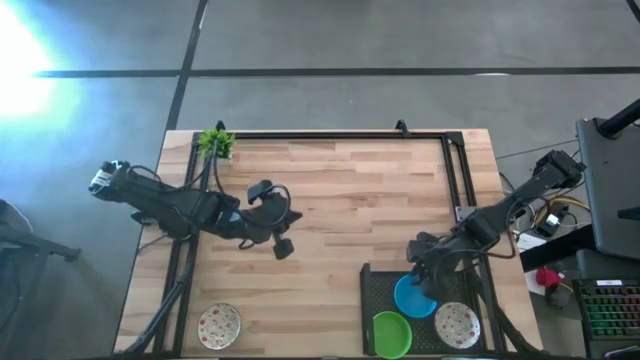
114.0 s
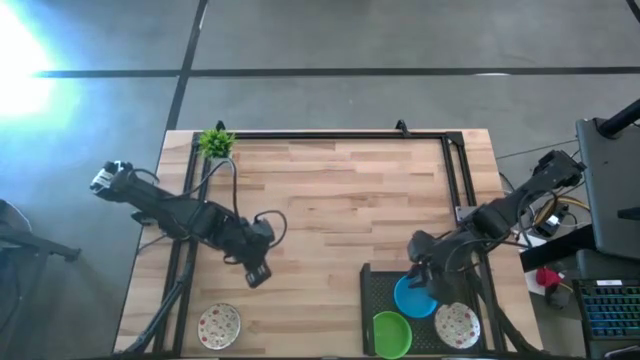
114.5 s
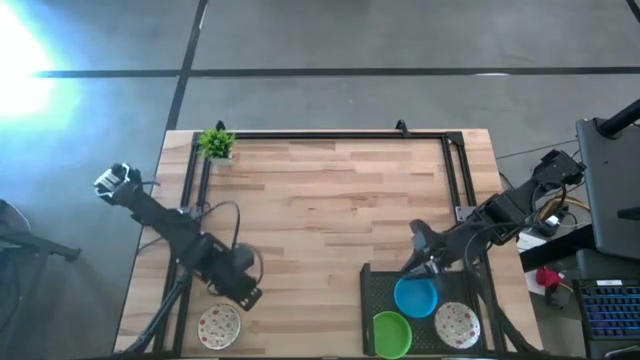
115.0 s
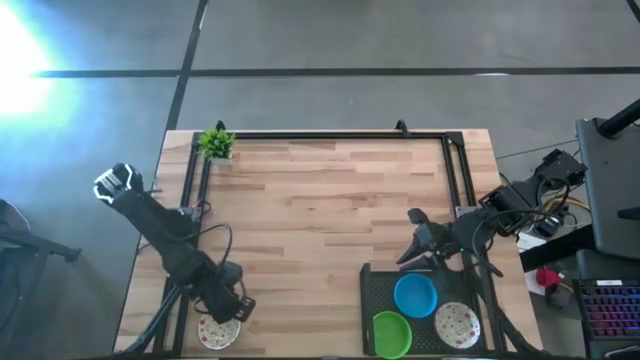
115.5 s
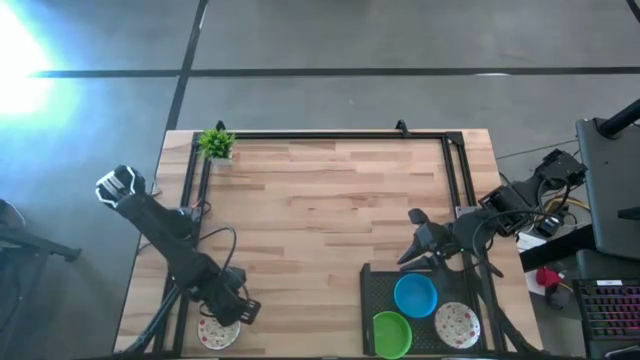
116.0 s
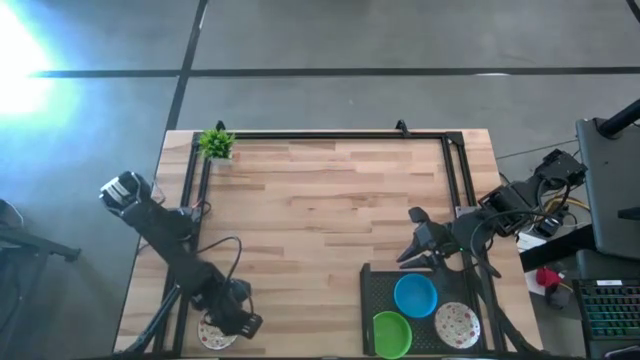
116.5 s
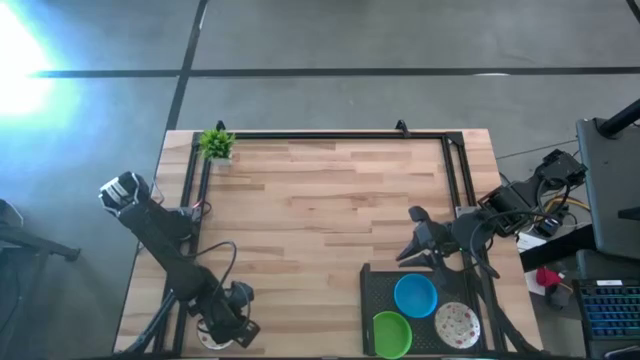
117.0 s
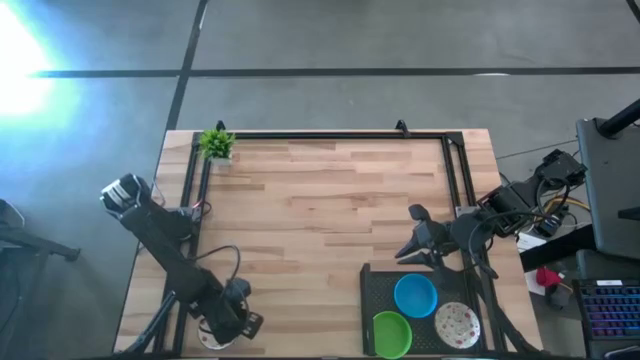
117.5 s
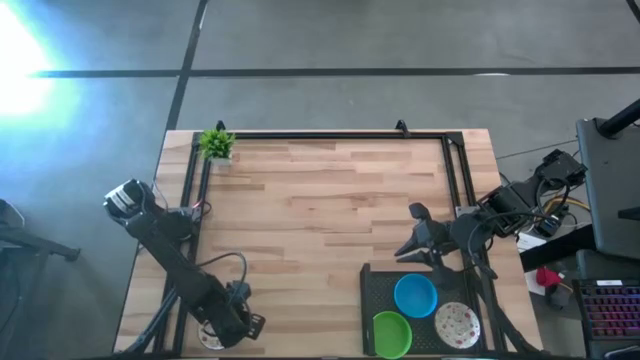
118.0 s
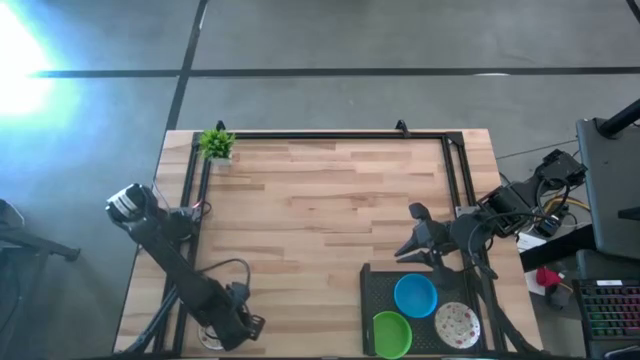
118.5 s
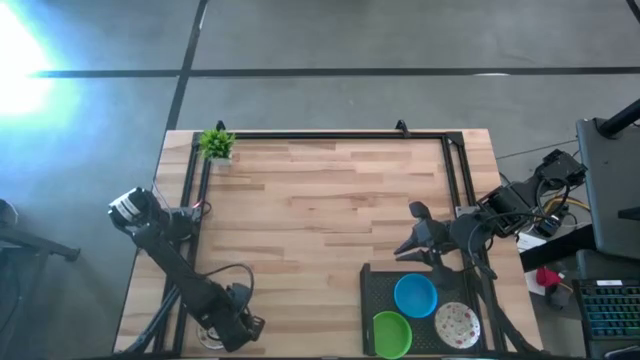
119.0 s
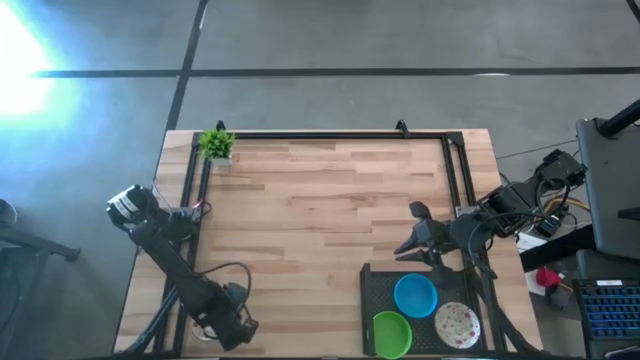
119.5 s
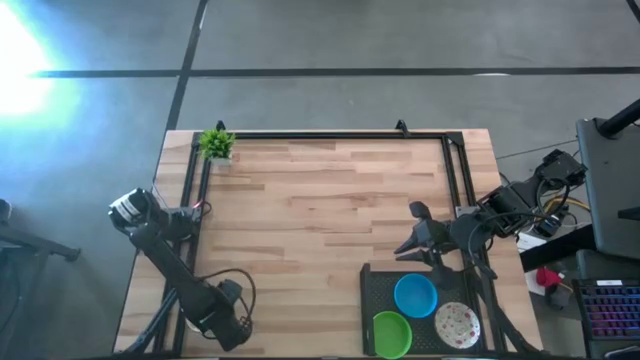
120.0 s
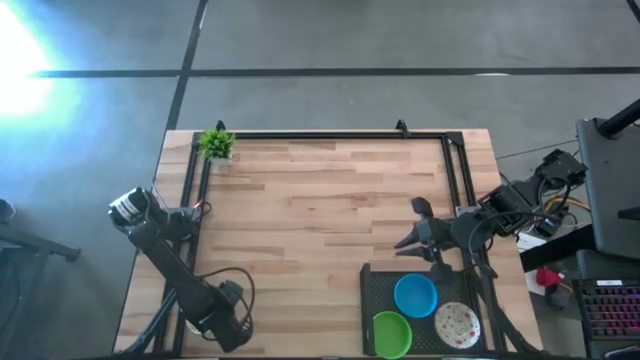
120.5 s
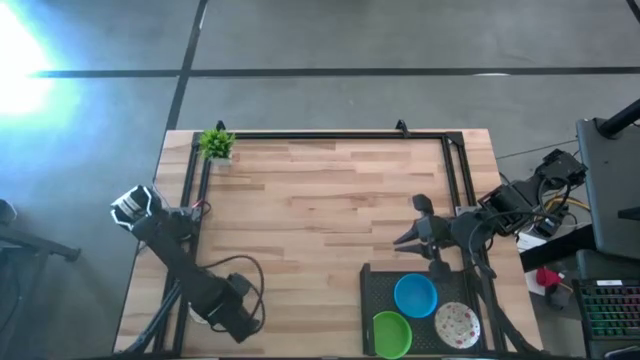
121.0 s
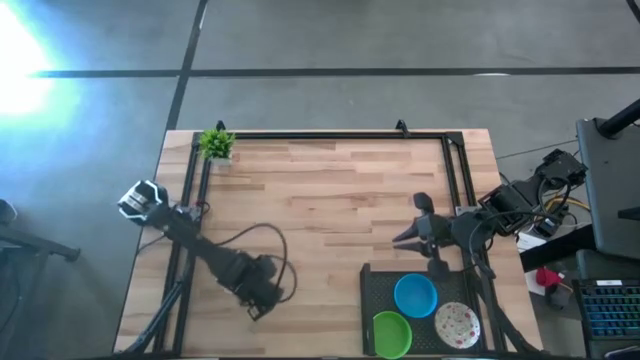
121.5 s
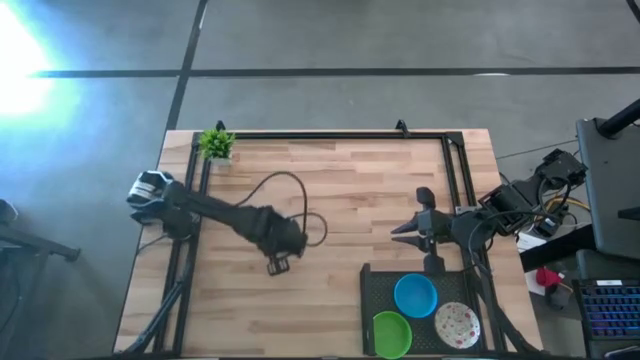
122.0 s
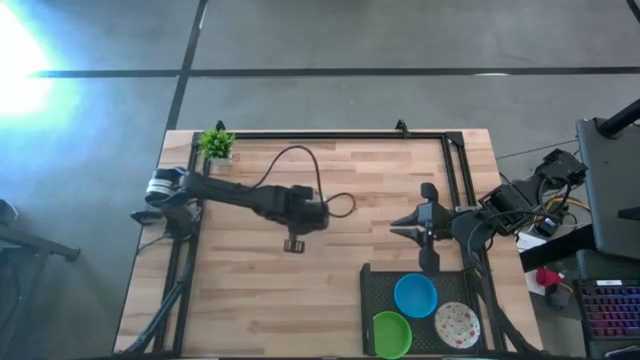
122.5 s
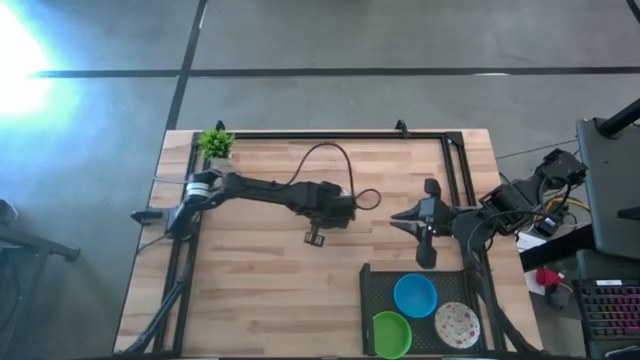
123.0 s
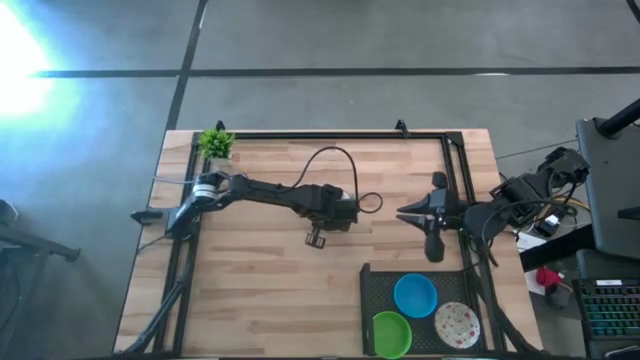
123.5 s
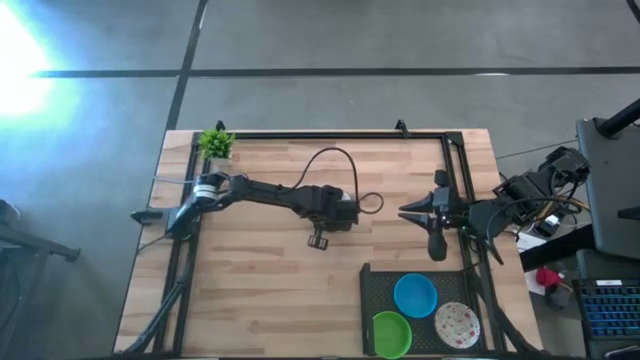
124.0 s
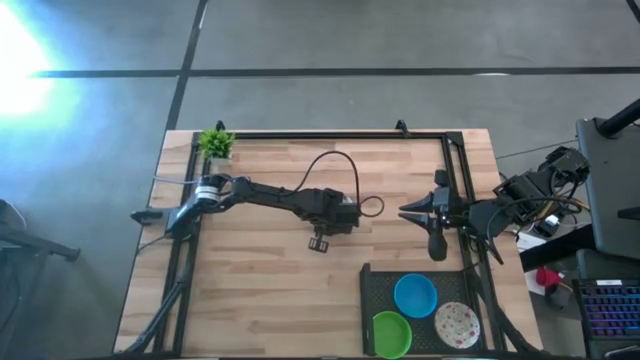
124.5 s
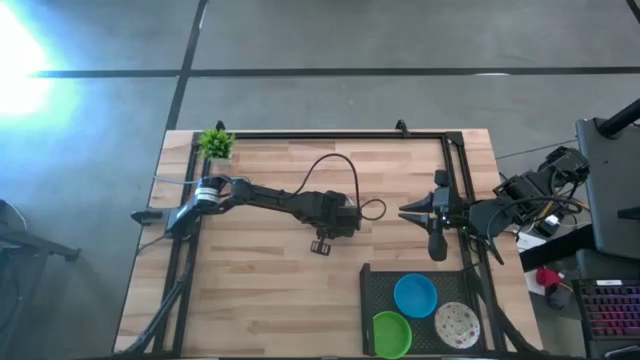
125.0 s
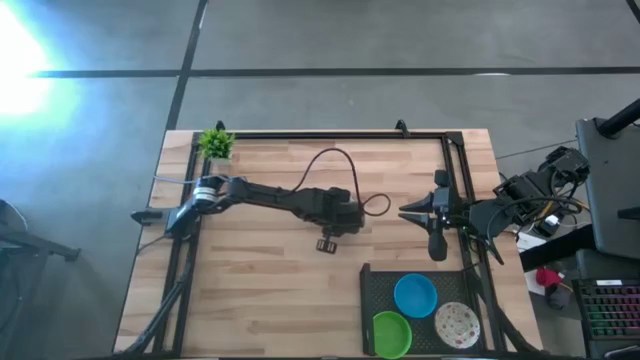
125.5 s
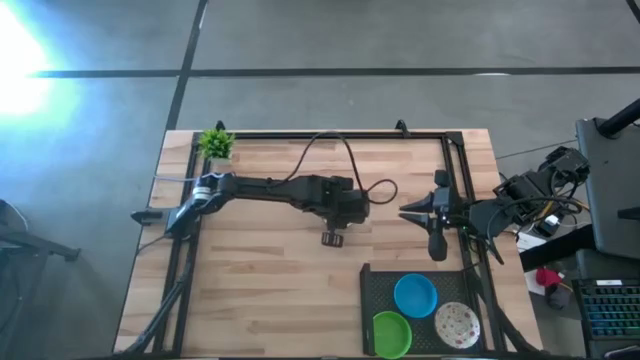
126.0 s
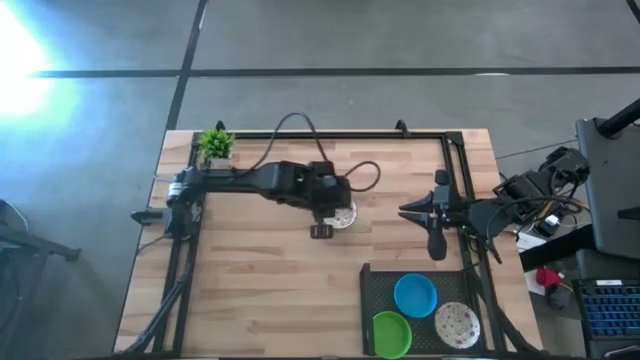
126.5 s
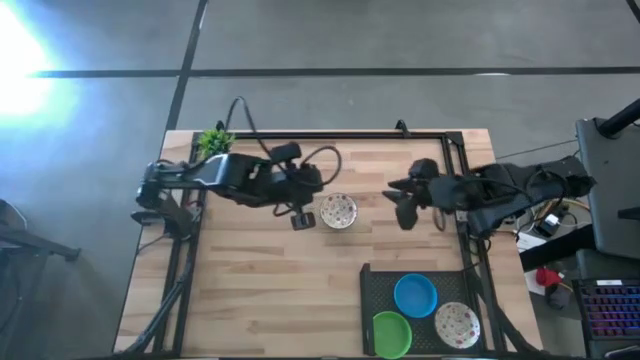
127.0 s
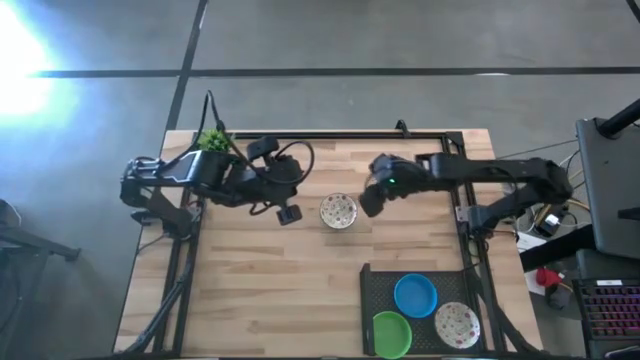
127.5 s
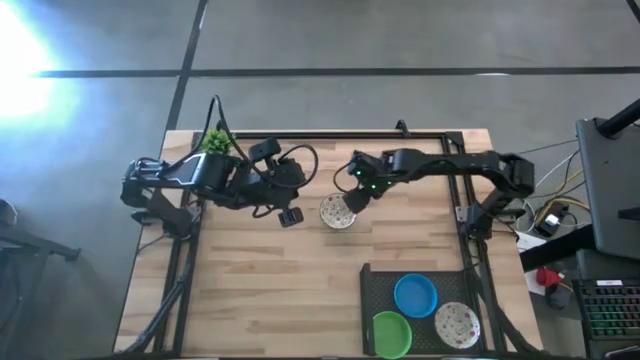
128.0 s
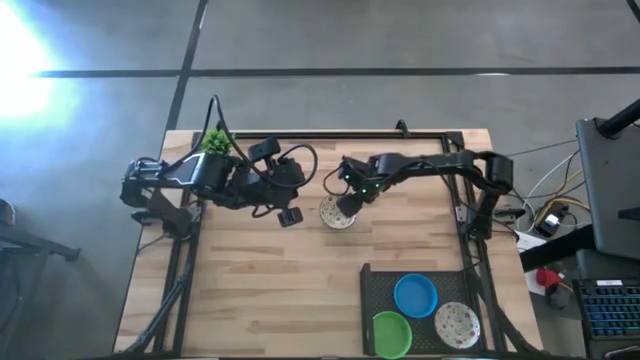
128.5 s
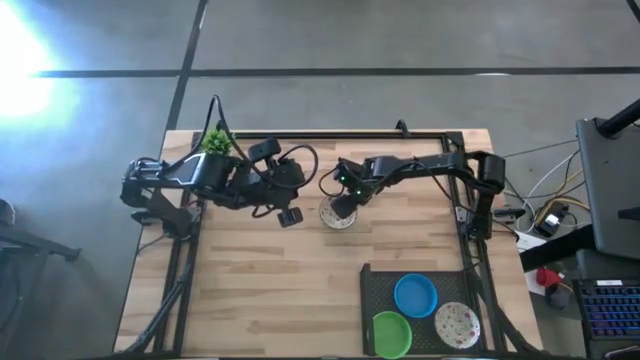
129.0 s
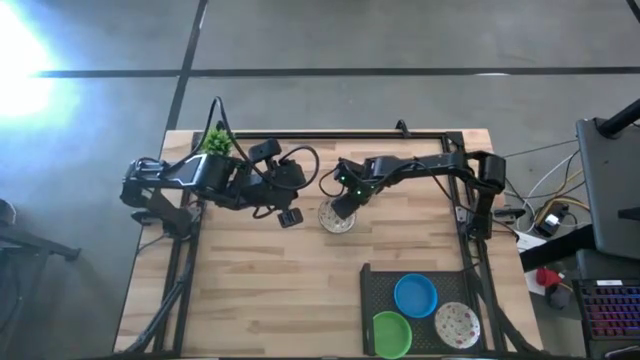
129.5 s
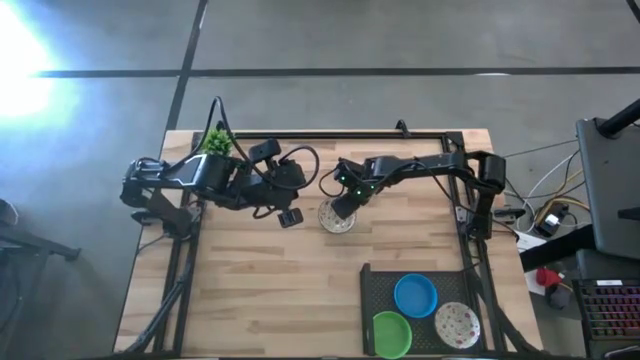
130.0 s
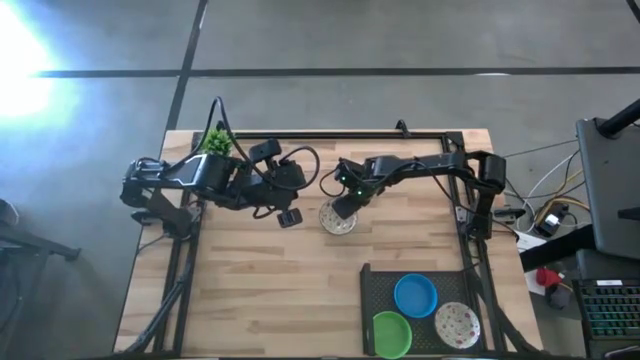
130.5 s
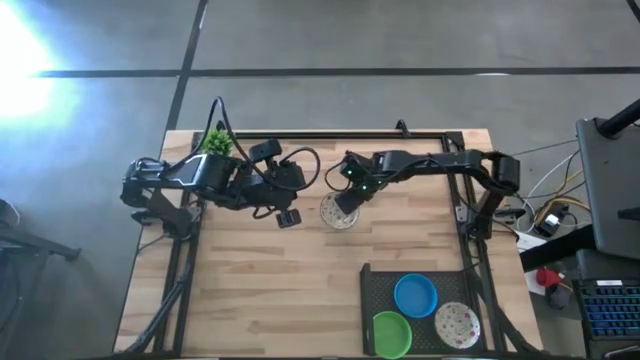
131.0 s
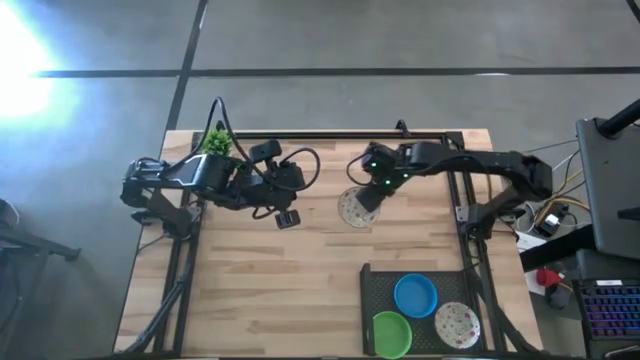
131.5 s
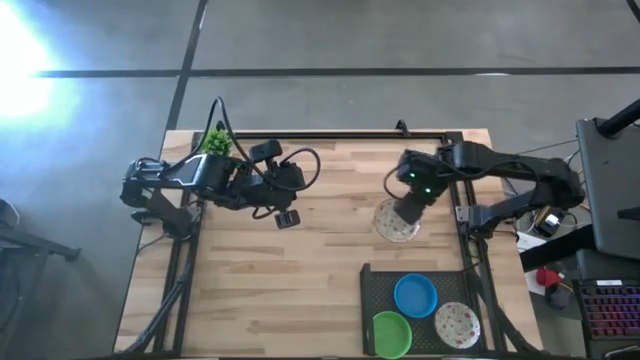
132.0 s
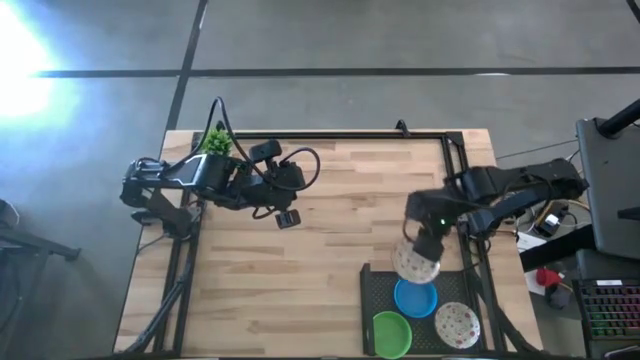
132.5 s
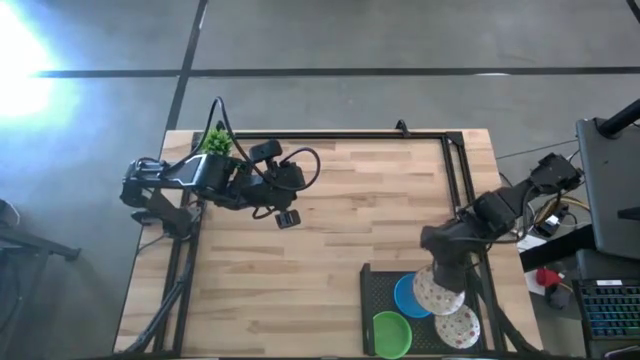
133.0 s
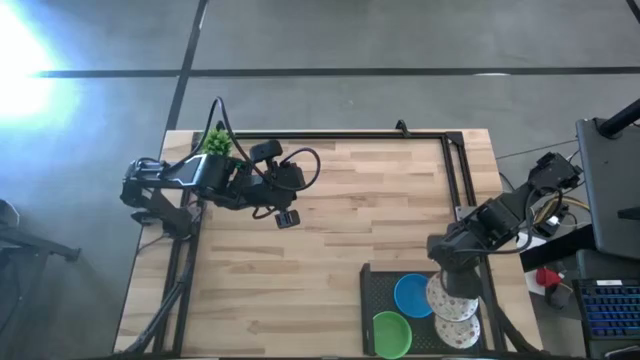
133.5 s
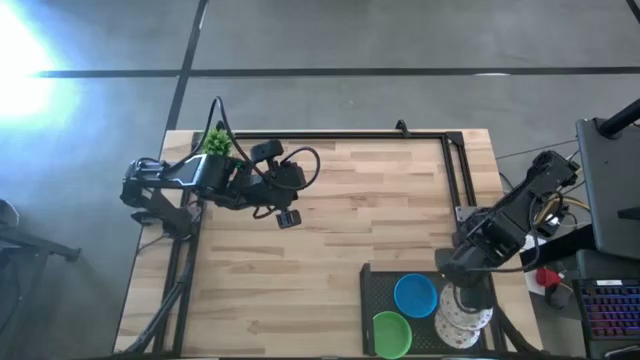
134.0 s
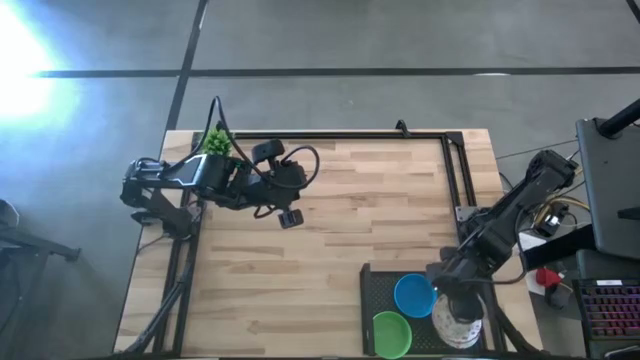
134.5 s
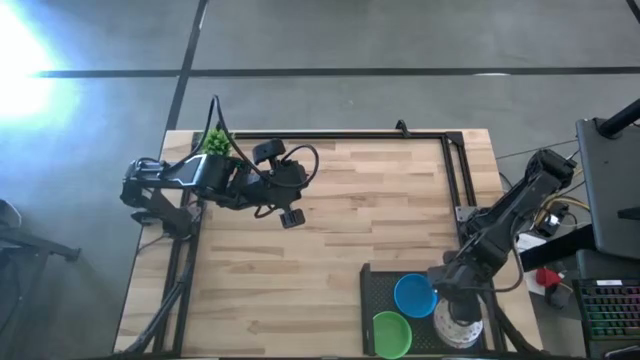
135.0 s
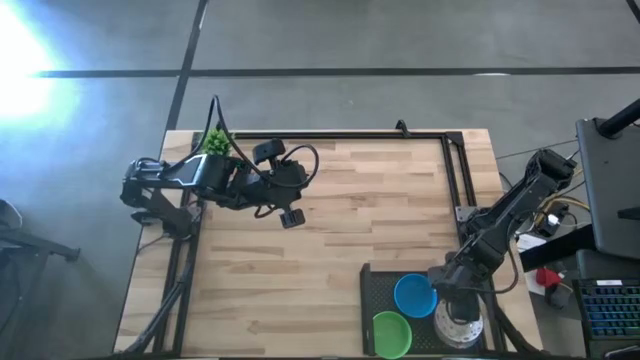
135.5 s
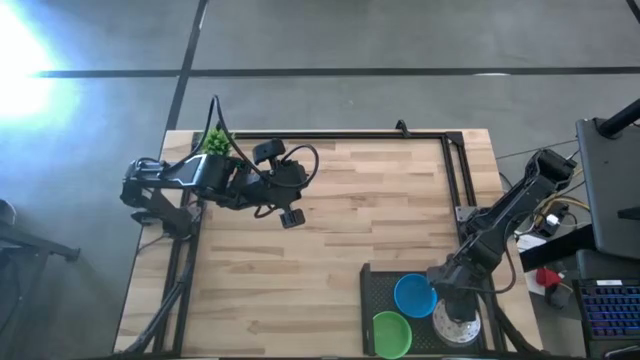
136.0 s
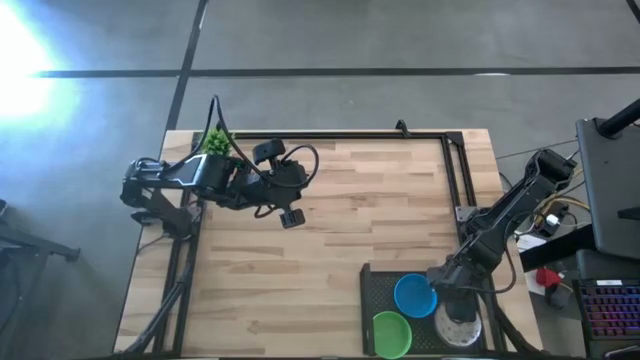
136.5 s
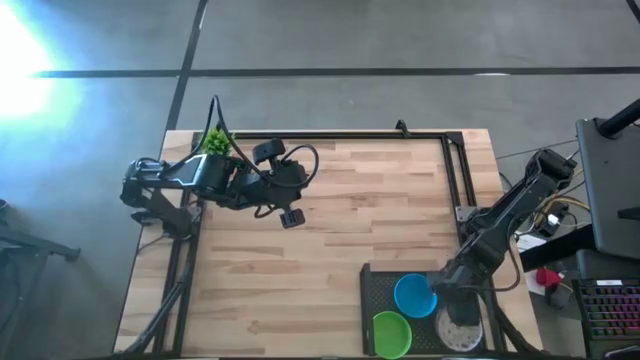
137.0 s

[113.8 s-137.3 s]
Task: Pick & Place Mini bowls
Stack the white patterned bowl on top of the white patterned bowls on the shelf
